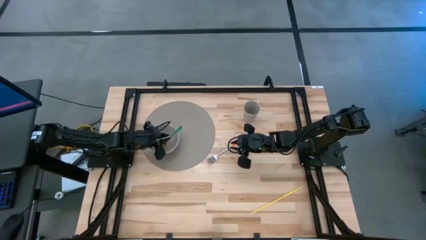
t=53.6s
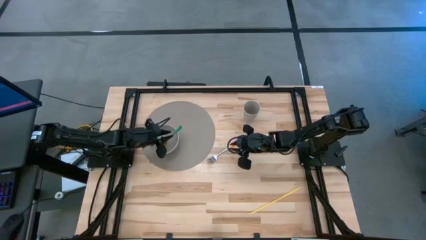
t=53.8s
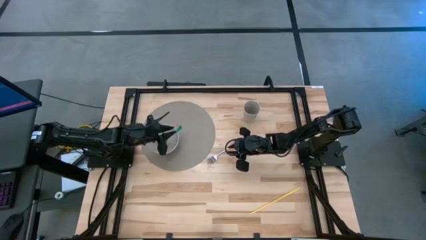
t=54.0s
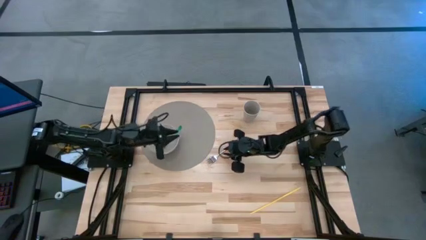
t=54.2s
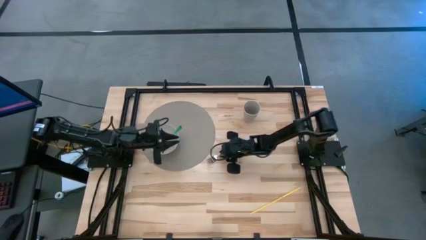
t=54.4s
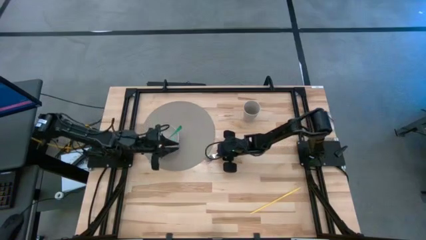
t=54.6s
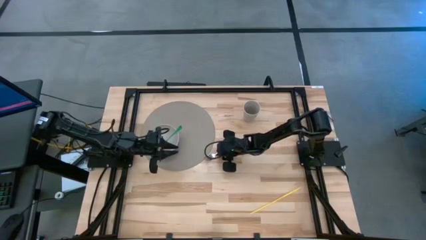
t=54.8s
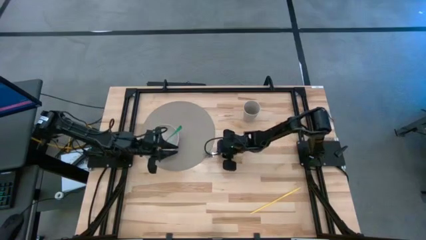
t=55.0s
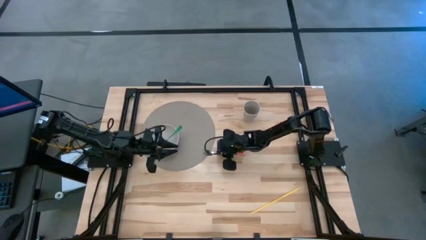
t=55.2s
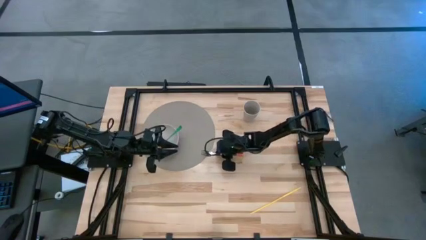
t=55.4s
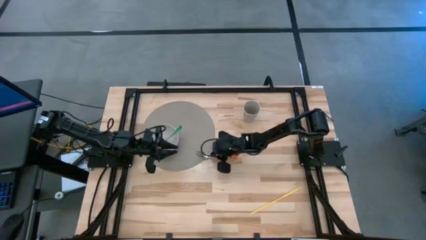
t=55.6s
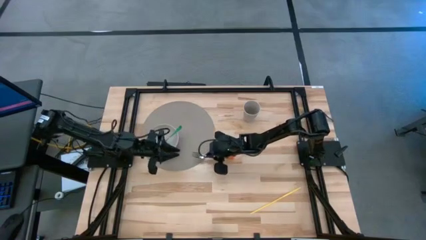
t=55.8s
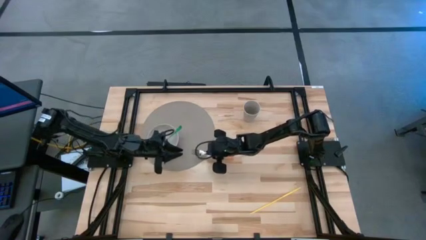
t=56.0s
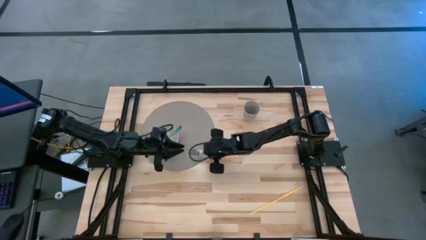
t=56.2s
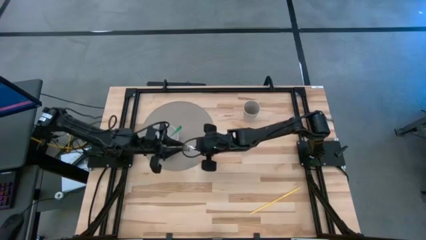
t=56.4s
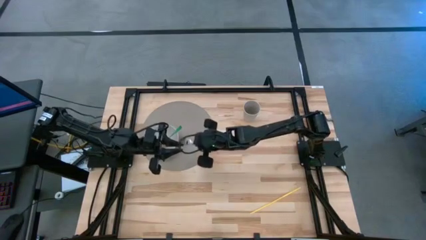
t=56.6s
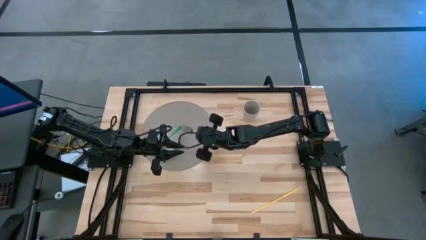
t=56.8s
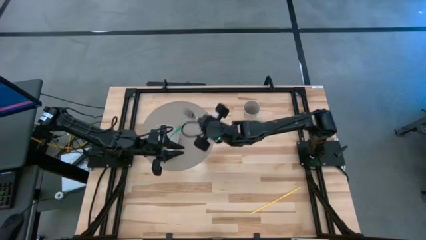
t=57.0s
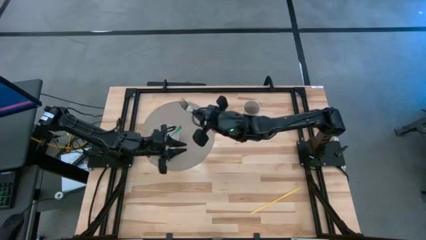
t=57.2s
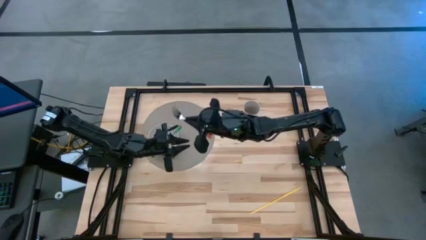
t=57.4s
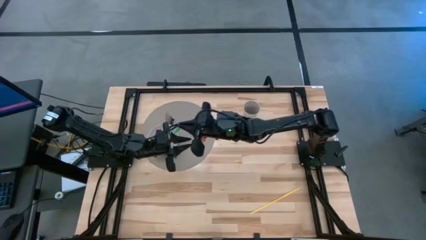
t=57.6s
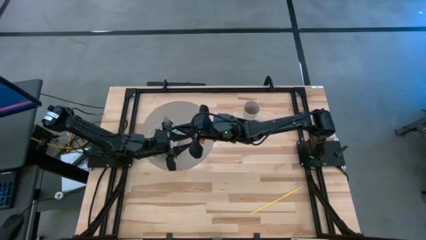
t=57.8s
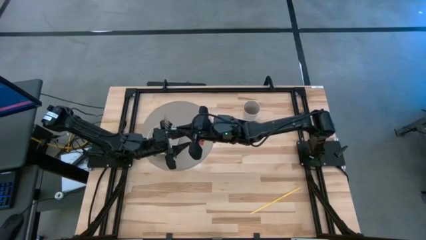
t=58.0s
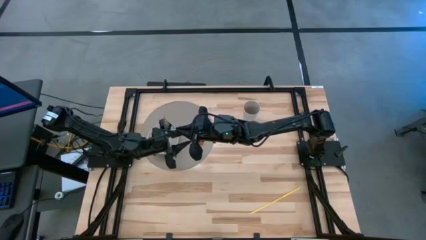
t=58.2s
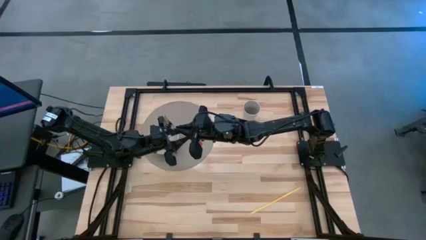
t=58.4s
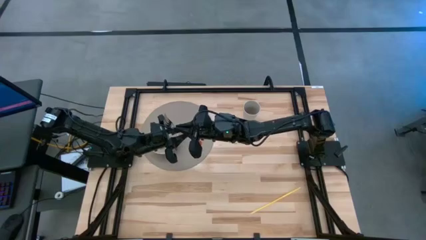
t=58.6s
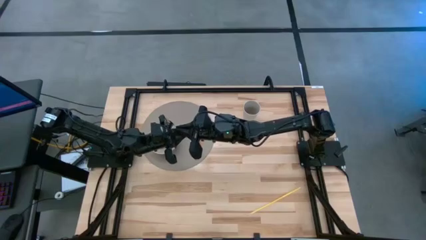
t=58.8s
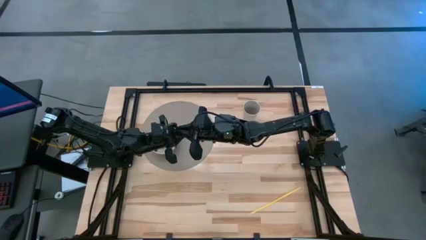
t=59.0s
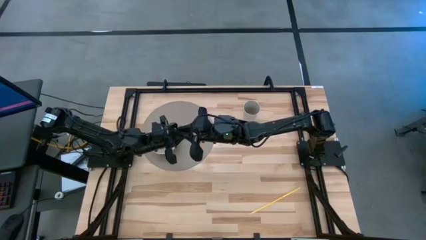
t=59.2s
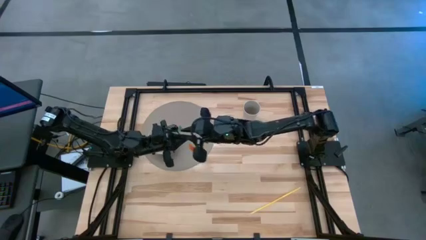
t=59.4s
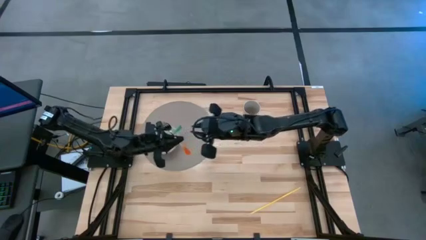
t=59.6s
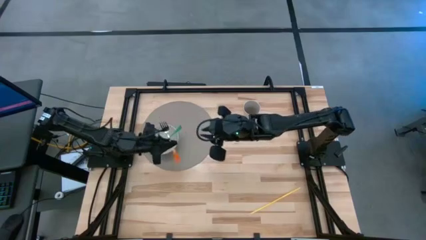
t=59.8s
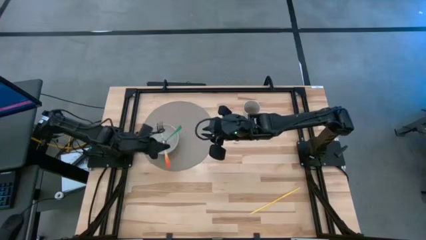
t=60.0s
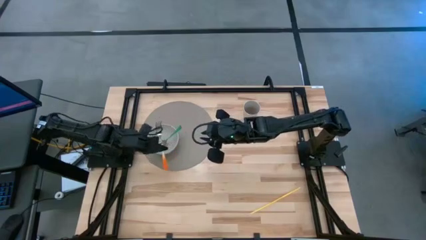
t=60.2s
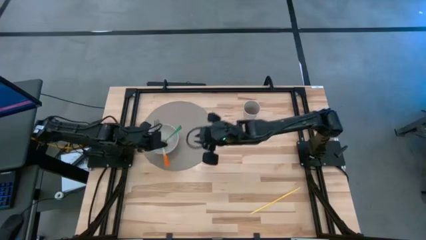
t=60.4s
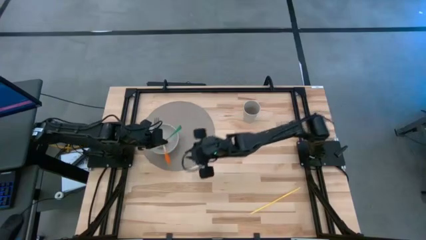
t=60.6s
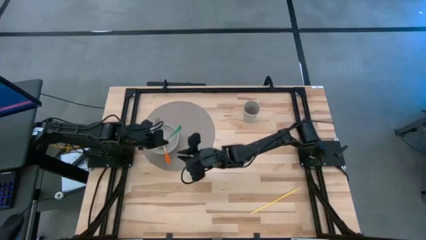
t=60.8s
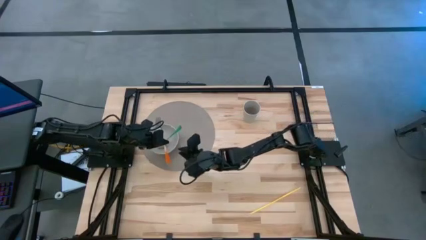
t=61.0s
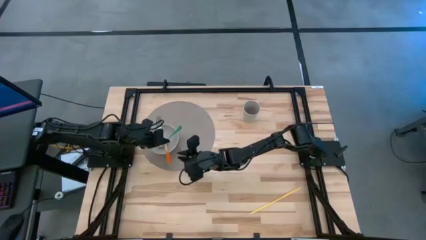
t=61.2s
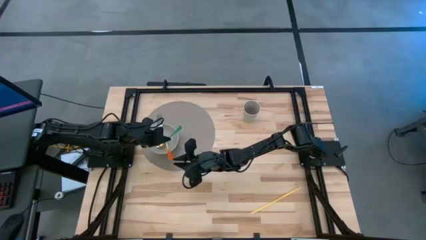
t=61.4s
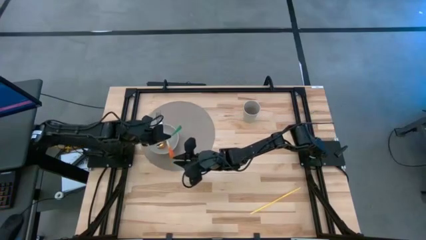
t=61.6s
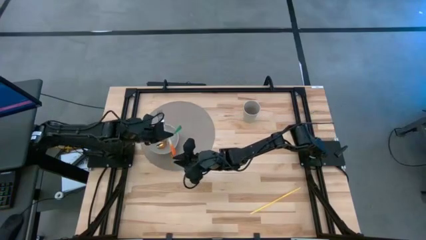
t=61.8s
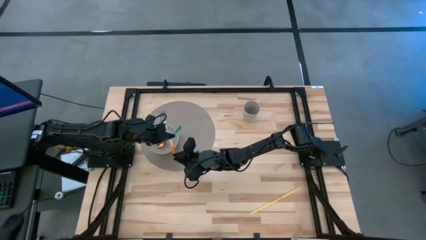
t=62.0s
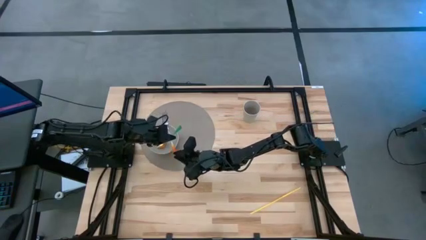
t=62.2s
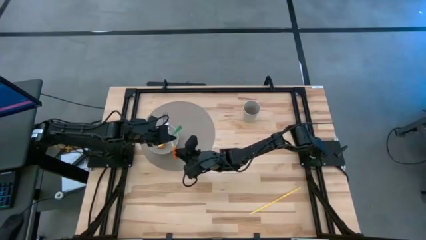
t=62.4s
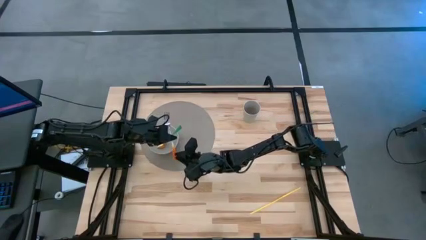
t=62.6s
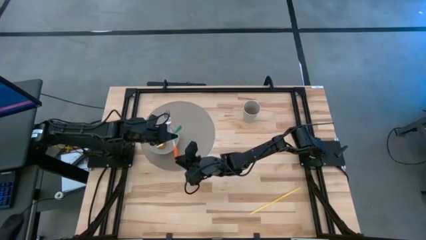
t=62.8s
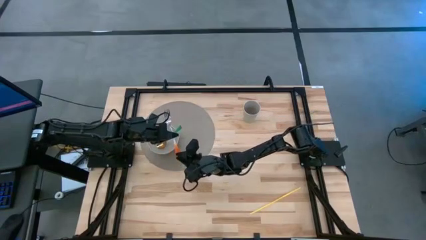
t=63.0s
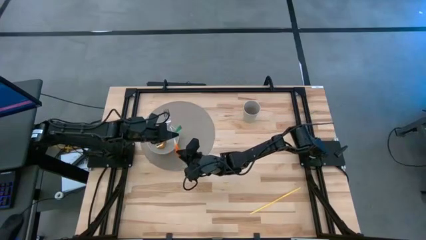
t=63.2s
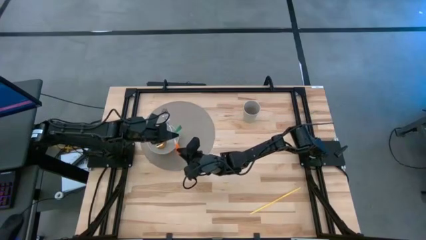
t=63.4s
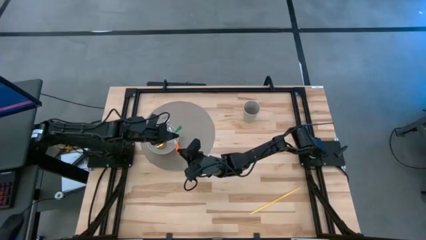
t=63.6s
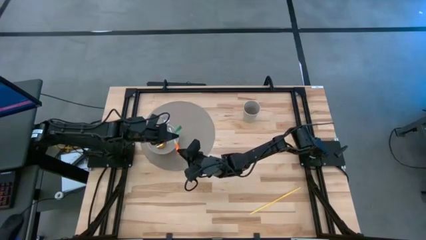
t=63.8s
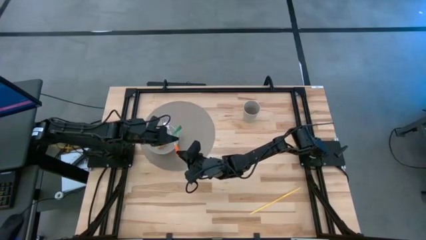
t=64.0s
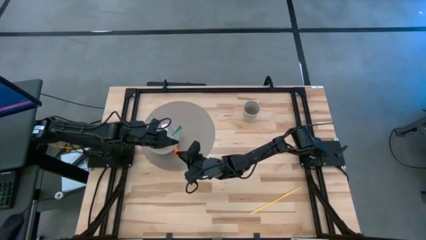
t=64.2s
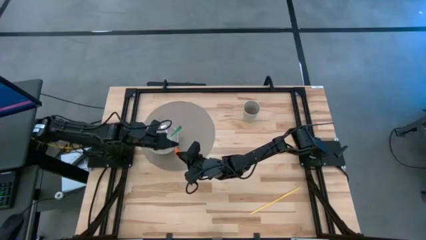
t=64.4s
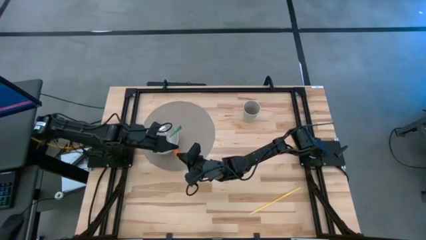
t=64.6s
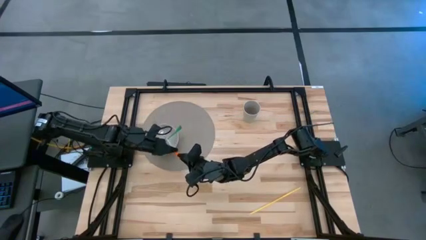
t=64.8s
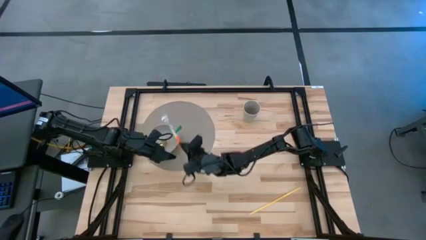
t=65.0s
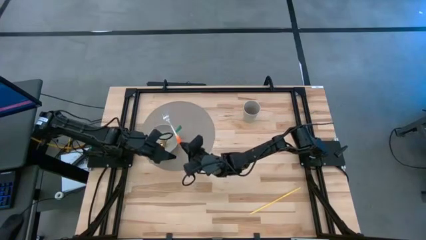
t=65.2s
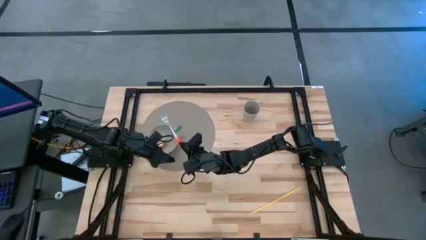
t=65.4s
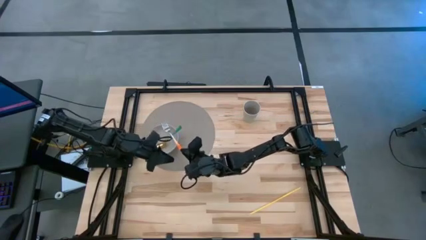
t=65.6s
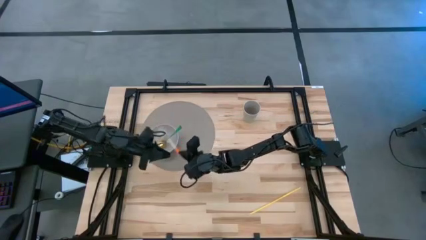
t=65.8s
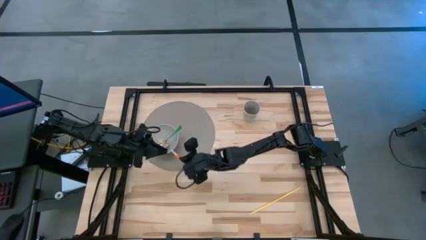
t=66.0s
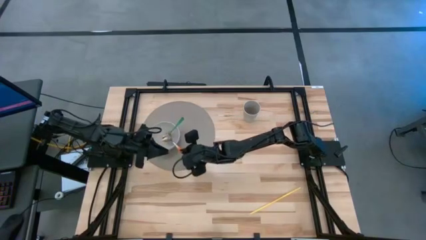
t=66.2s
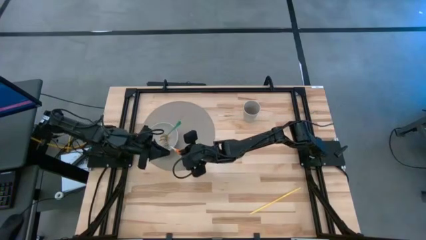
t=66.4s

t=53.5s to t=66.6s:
Task: Pick & Place Utensil
Put the orange fork into the bowl

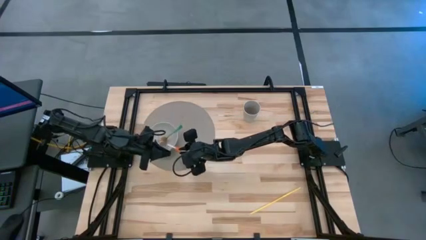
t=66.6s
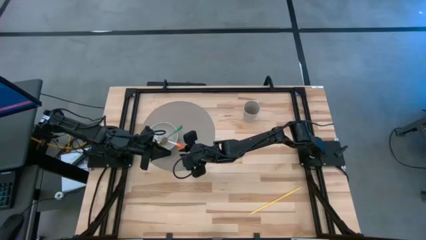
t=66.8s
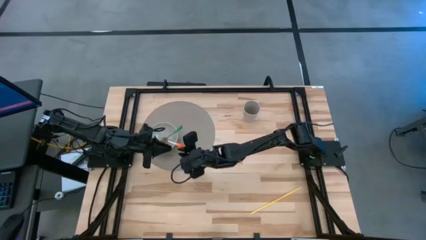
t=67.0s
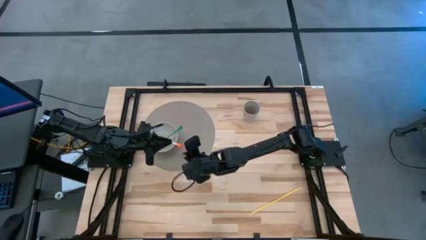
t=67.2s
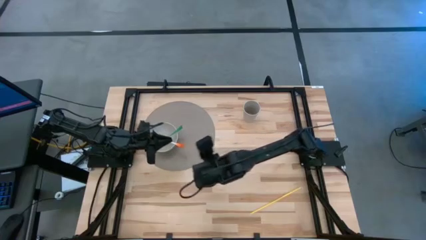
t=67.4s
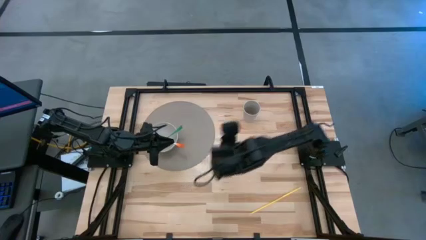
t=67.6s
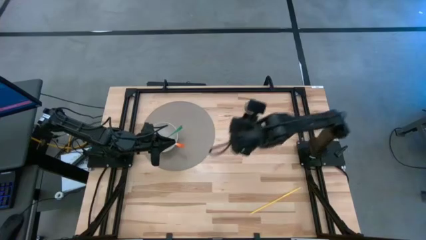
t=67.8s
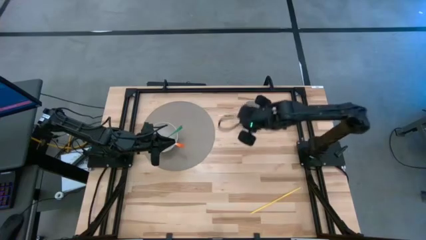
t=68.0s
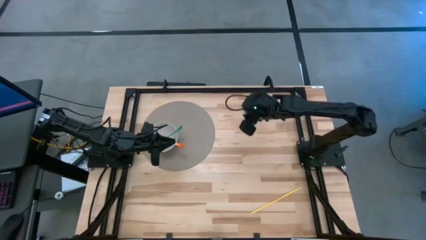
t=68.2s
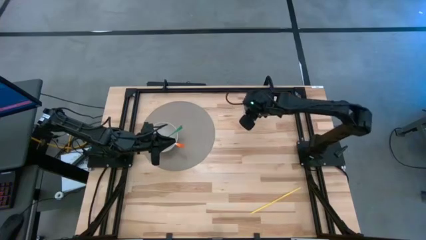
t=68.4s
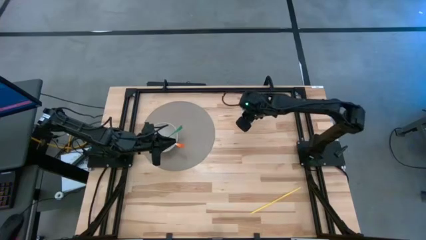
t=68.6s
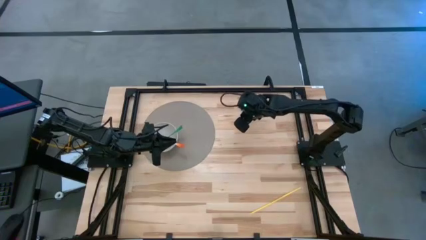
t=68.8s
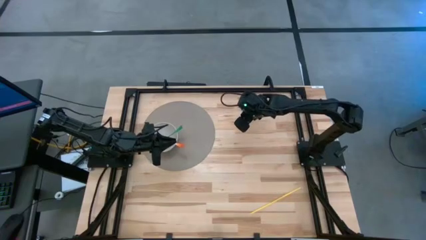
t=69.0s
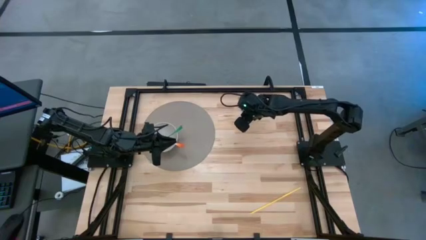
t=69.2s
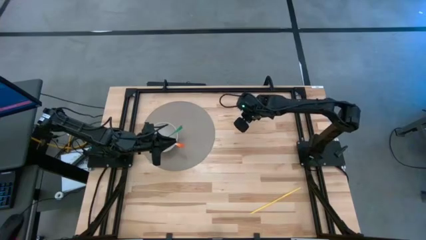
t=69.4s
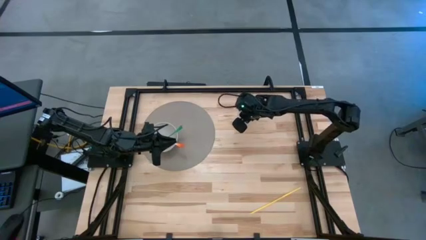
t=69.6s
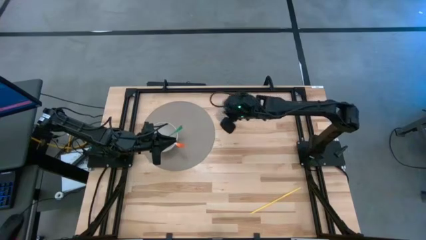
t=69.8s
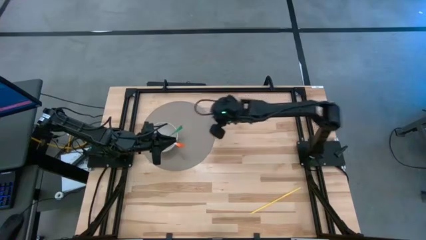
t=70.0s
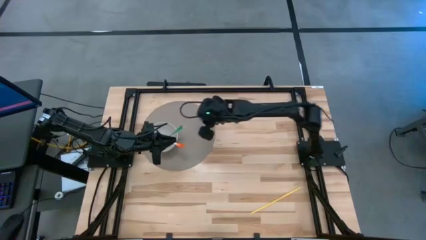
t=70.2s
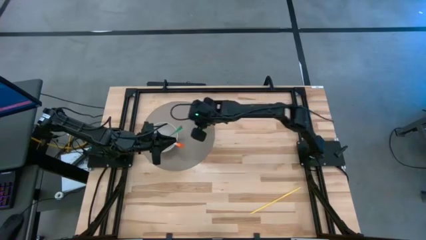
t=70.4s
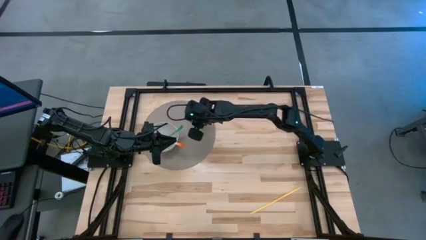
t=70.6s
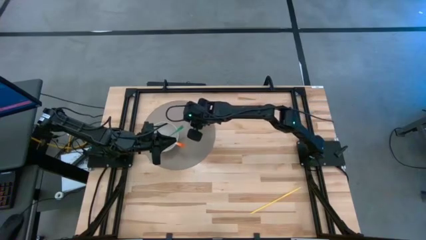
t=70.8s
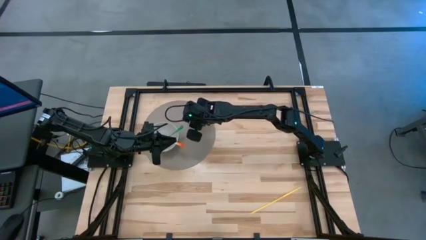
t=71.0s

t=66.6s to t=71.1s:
Put the white cup on the gray placemat to the top right of the white bowl
